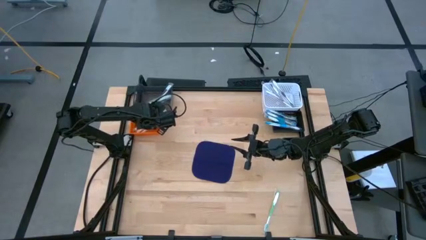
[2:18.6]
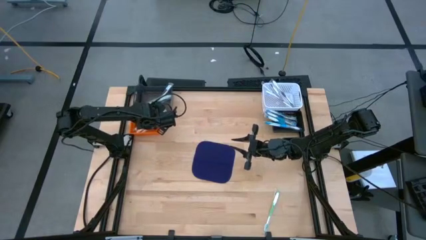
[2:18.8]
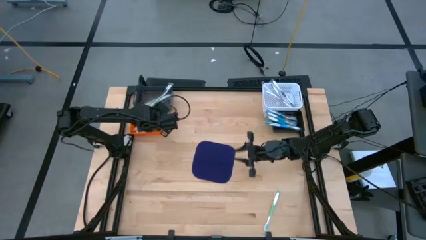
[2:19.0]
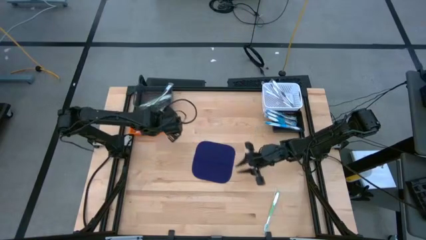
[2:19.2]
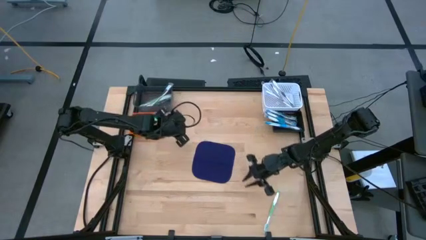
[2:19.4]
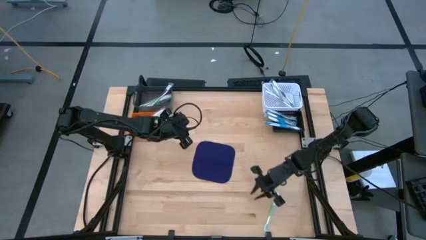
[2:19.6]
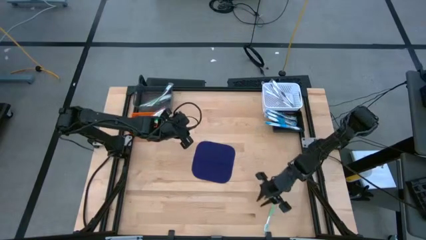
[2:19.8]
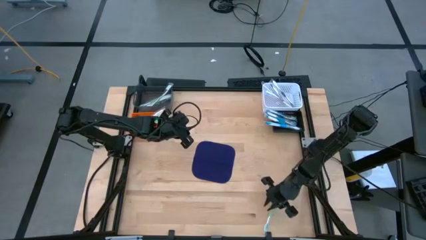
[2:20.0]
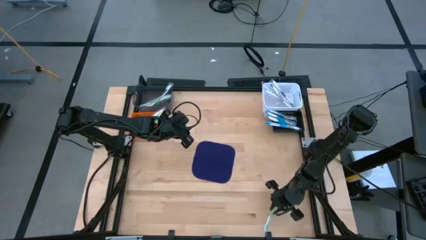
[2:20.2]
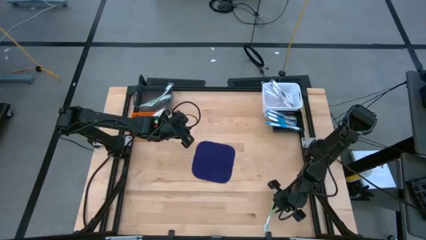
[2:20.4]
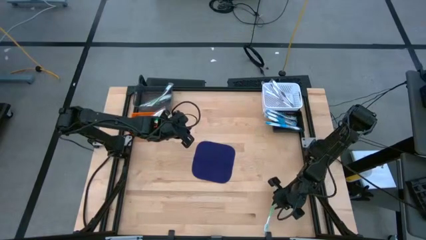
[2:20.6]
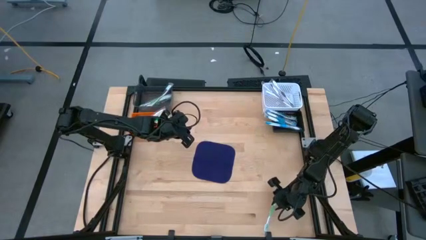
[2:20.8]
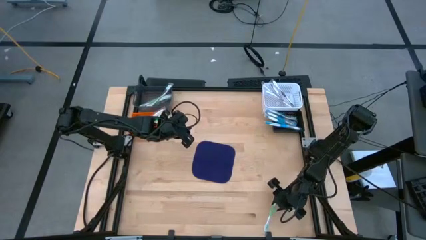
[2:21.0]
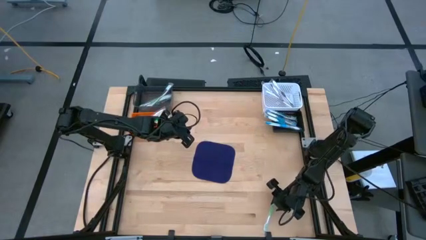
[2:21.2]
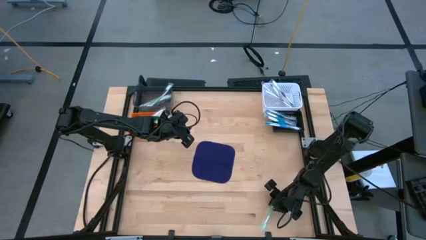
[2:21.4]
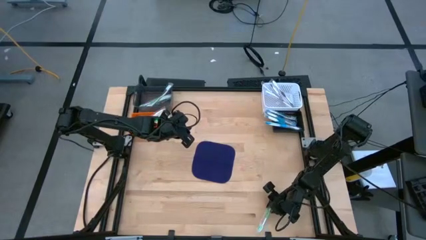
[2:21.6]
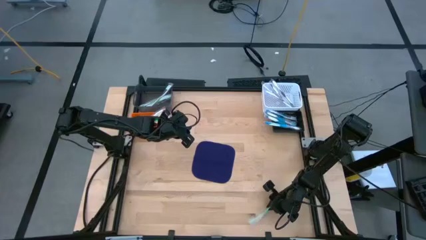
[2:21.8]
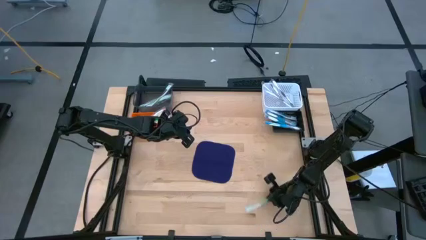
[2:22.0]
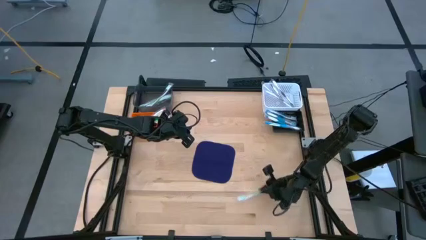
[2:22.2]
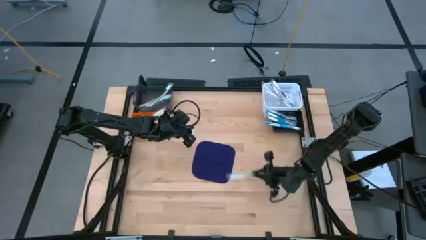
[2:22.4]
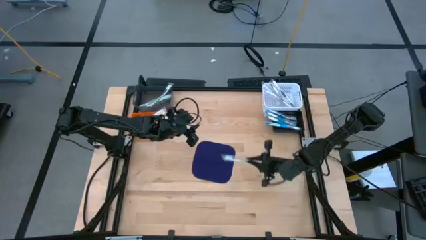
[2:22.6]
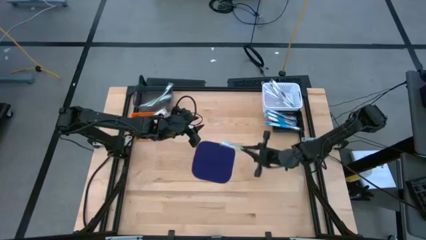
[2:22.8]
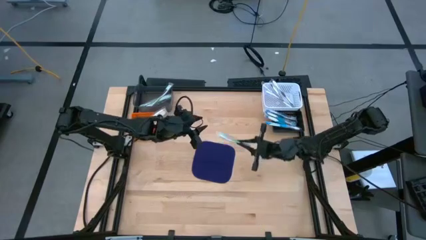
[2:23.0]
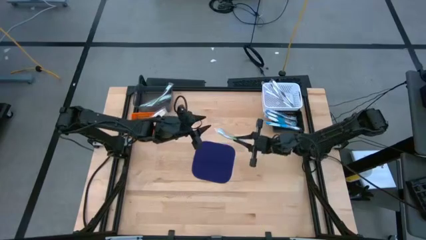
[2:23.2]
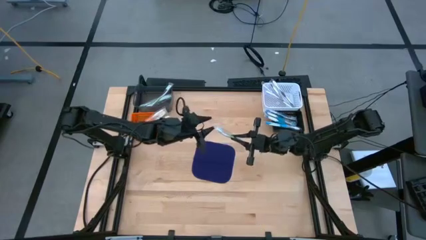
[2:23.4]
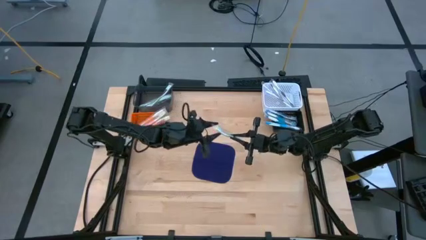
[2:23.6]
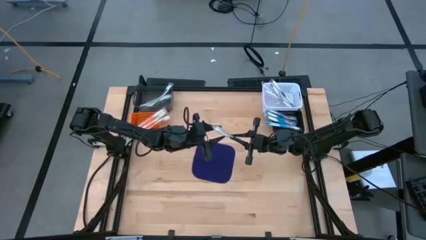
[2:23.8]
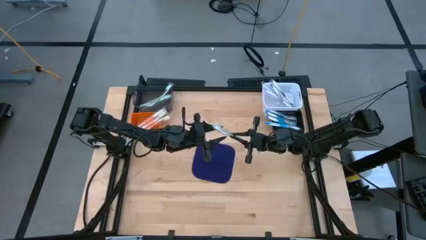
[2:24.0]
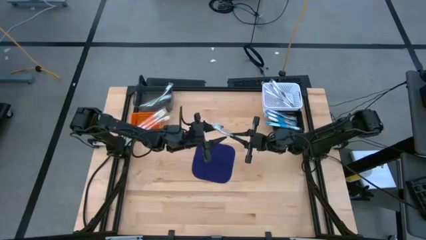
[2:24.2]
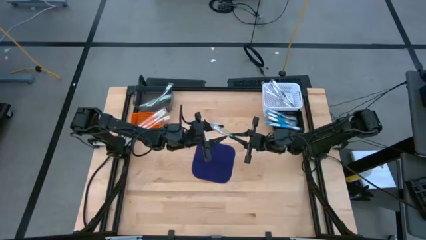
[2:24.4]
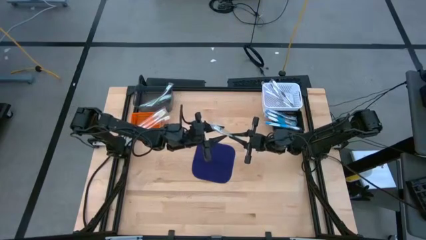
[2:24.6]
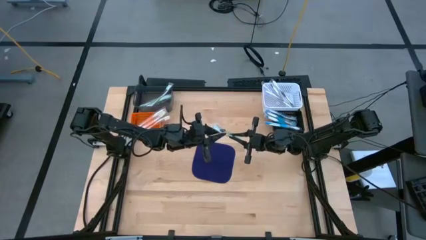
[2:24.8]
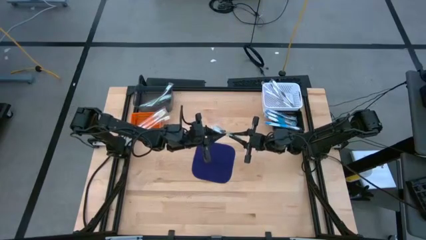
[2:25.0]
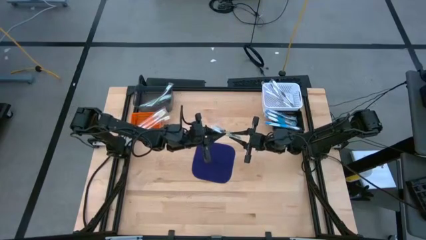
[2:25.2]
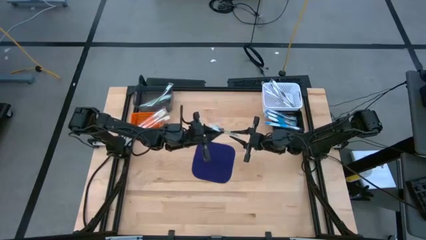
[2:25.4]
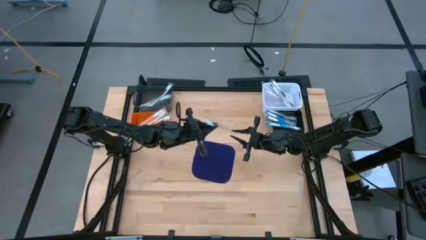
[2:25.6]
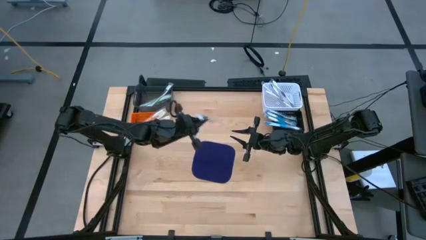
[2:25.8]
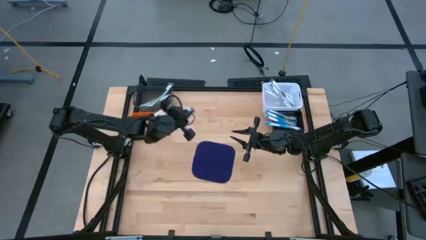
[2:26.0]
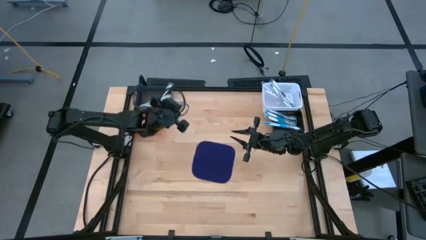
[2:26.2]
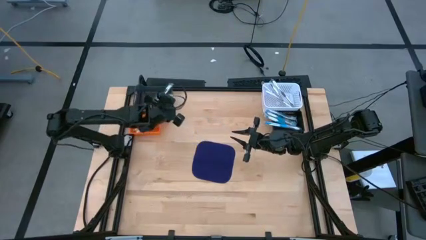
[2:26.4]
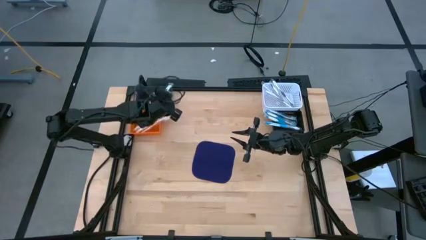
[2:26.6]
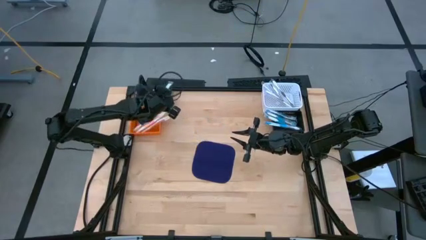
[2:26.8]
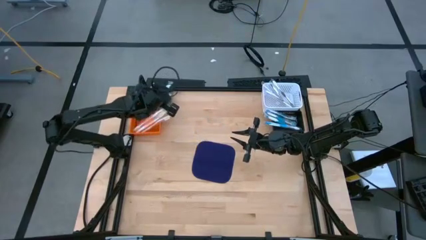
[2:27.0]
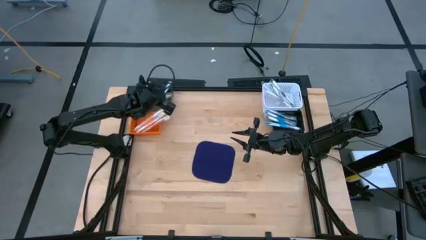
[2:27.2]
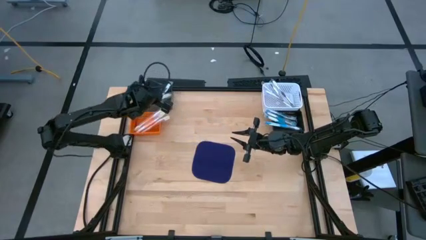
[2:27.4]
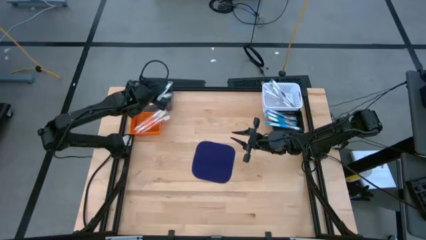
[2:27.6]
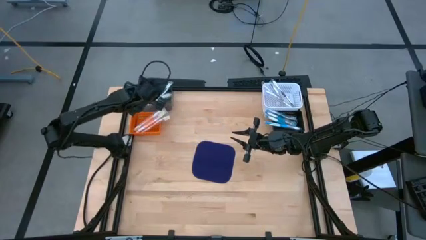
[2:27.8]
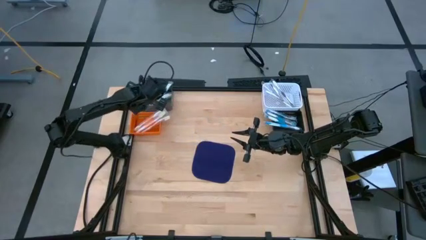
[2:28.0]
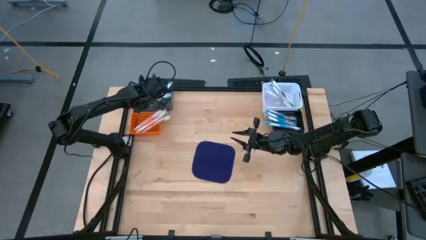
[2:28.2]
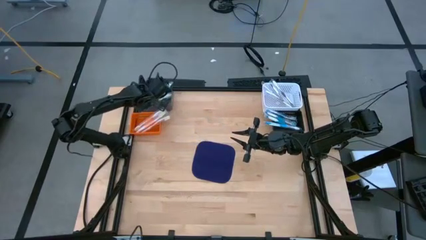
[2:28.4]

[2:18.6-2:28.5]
Task: Pick & Place Toothbrushes
Put the green toothbrush into the gray bin

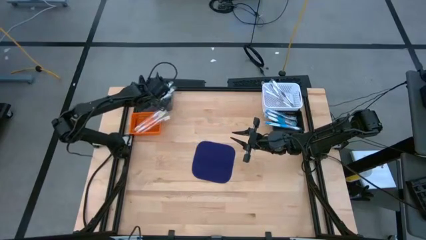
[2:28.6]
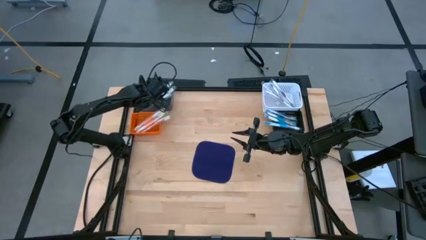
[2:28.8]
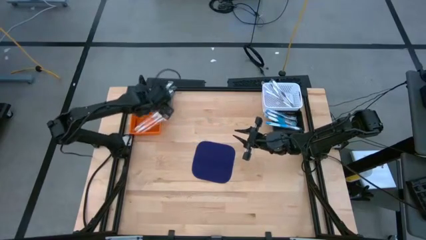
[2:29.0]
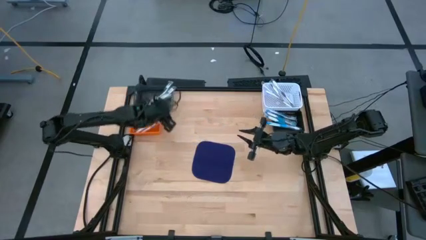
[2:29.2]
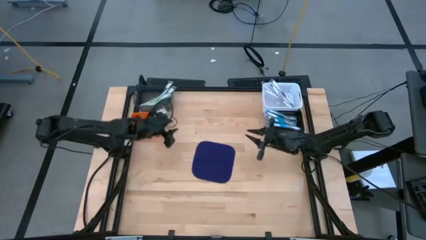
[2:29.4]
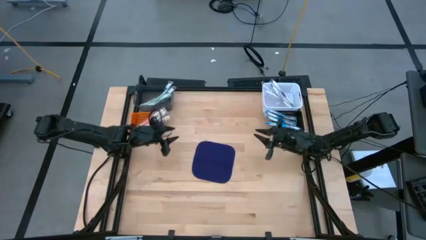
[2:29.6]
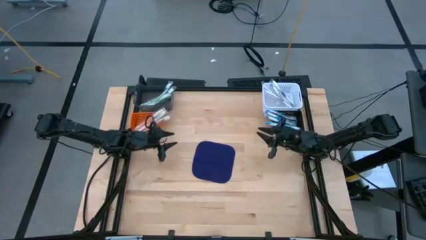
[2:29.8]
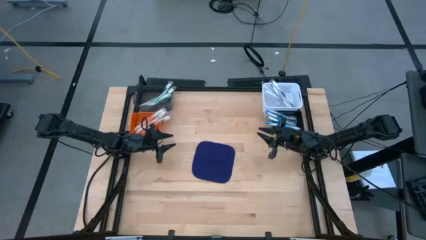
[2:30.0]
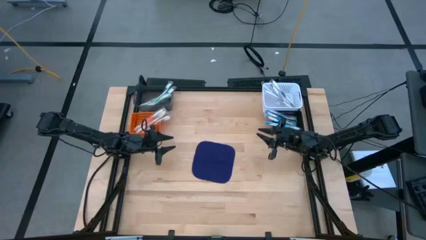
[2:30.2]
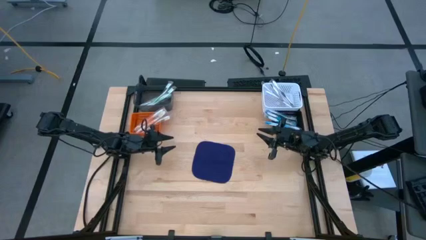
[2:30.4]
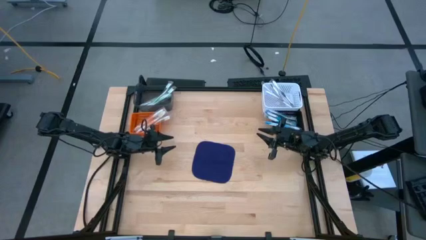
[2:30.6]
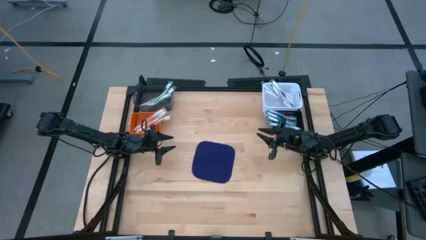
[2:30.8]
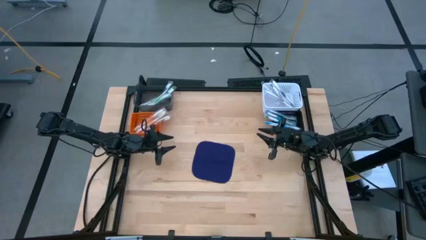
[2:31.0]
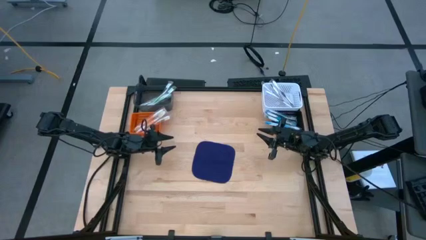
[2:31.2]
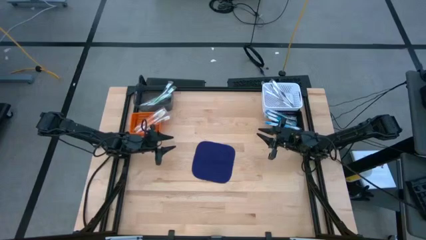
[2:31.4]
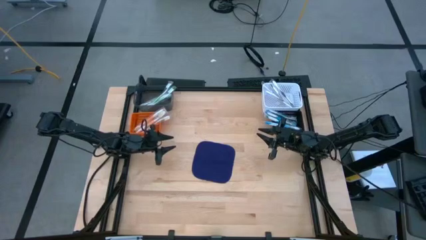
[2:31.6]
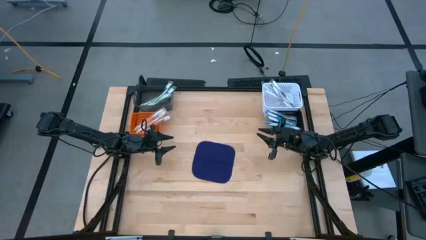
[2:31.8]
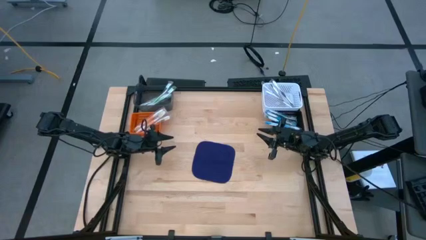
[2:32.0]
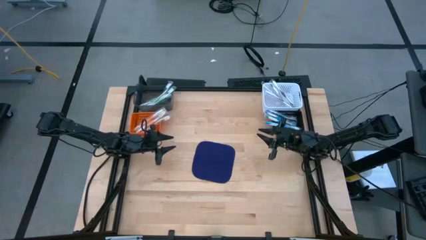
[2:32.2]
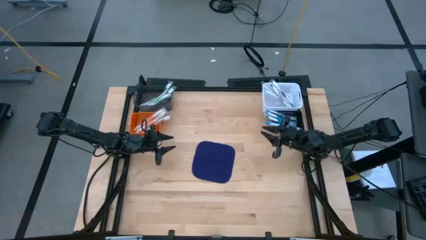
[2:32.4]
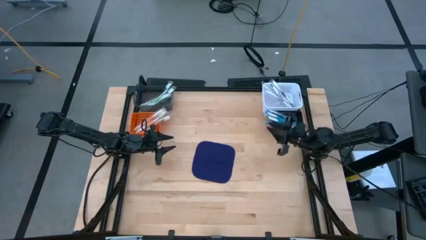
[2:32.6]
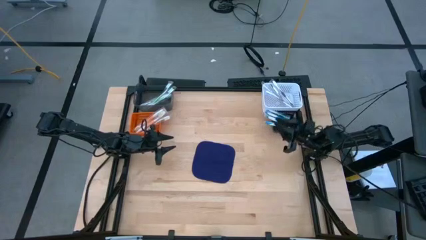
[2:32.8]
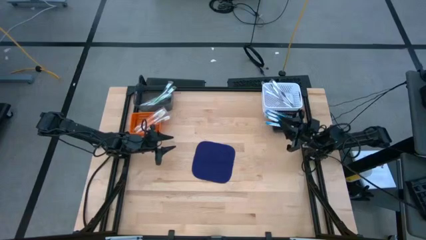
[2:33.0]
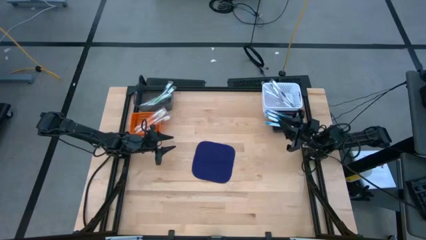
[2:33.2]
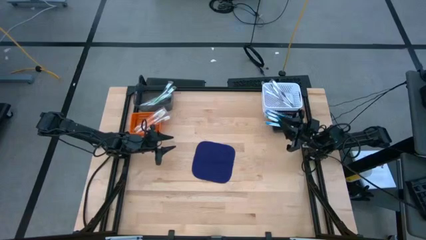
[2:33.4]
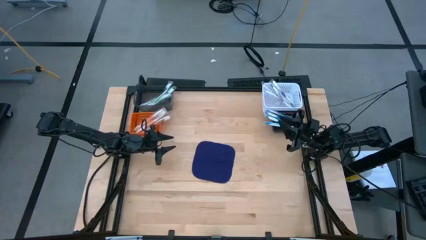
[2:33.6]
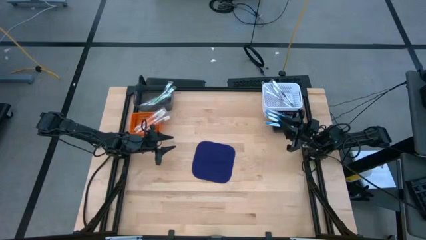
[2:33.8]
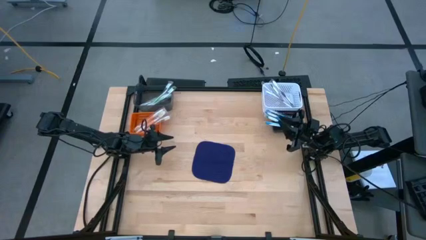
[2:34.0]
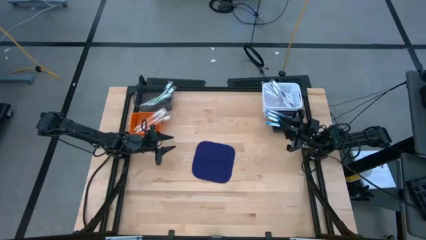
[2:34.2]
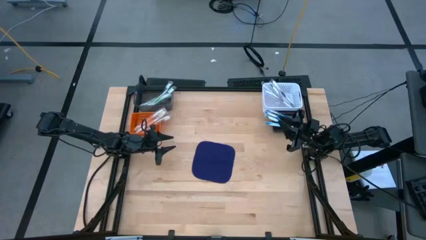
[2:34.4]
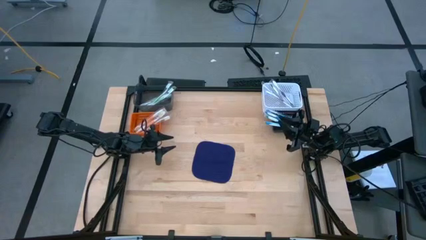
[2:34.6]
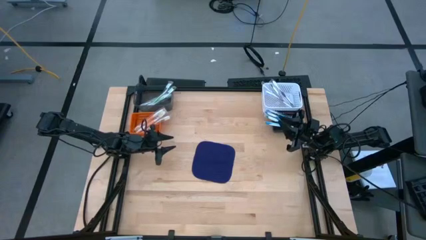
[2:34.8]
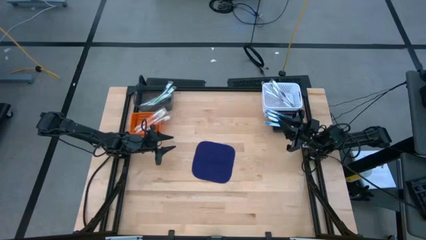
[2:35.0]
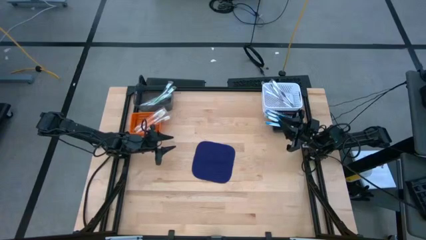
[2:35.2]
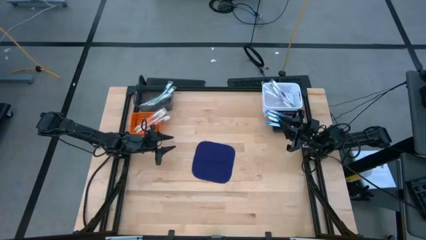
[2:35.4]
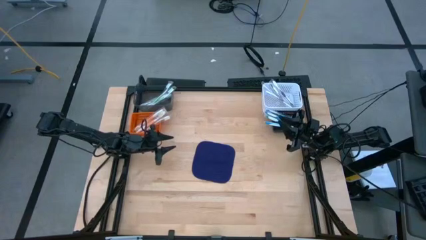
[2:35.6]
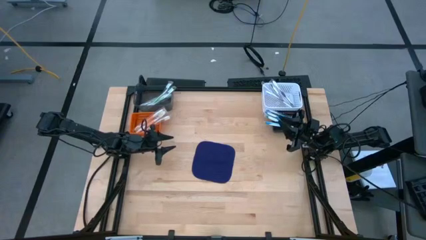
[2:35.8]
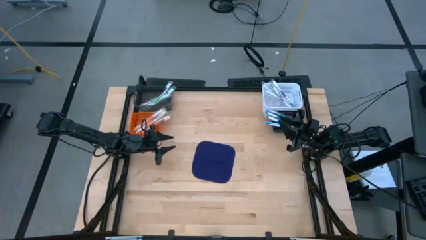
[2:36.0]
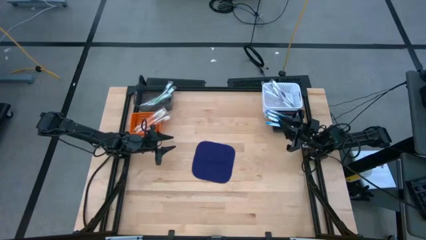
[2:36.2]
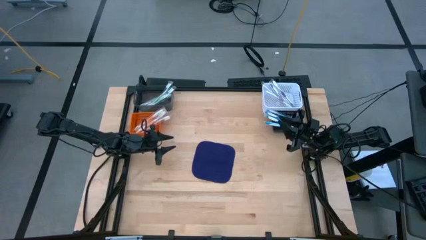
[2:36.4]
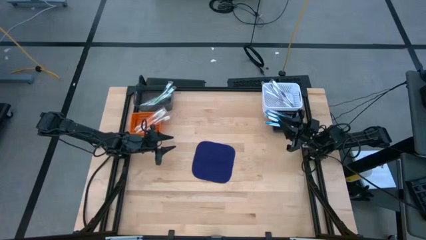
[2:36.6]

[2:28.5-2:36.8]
Return to Home Position
